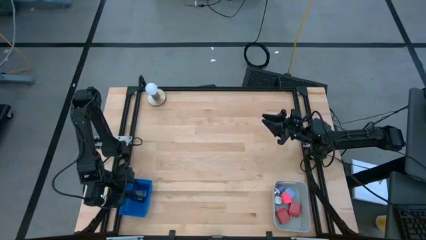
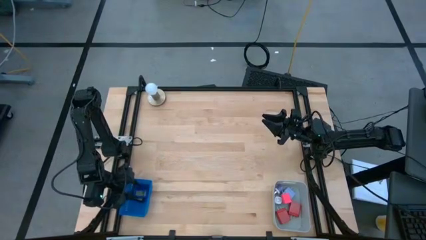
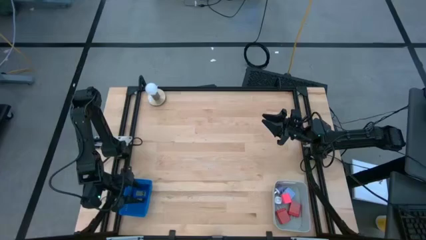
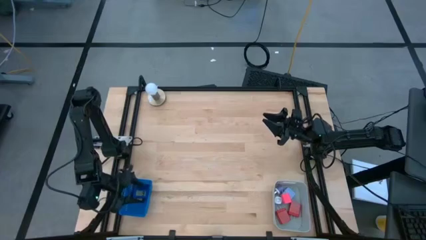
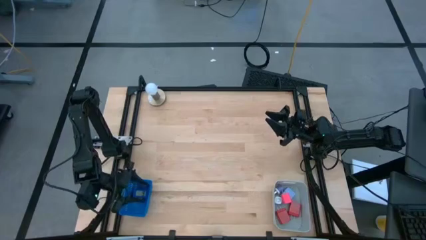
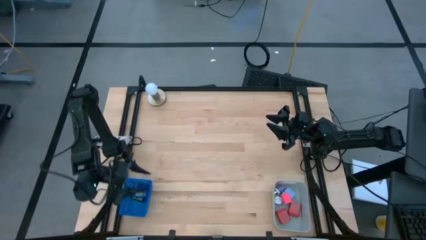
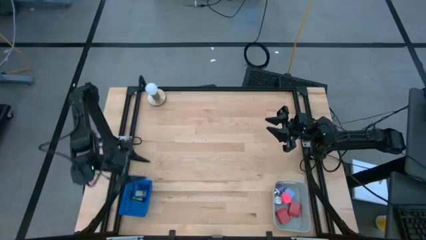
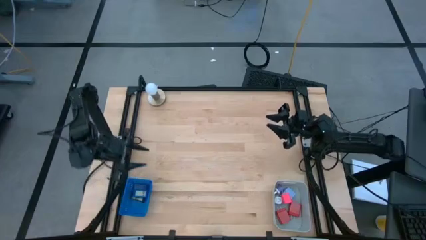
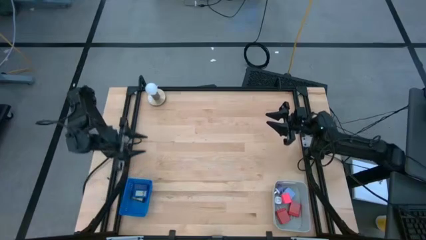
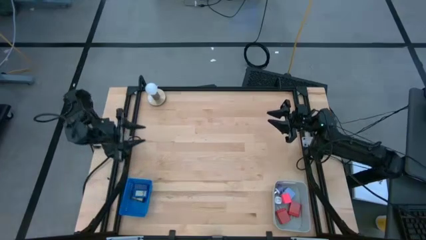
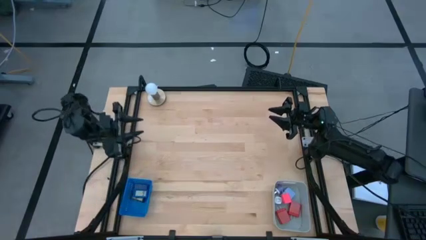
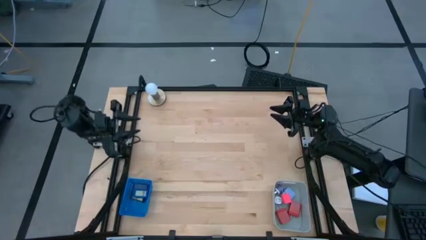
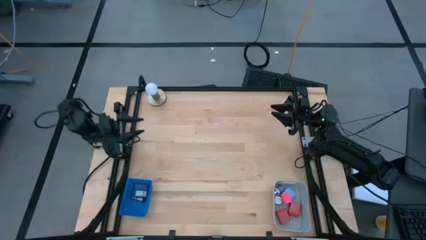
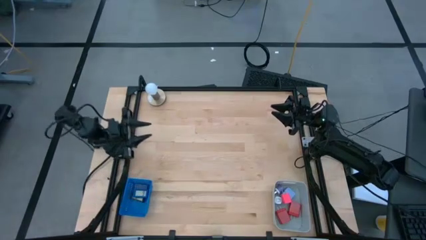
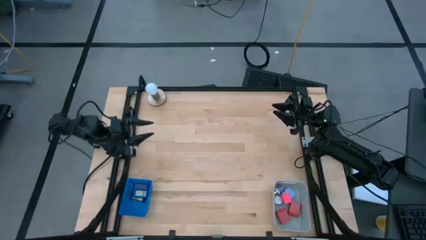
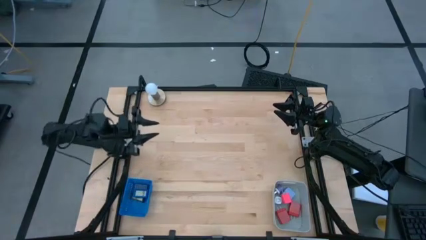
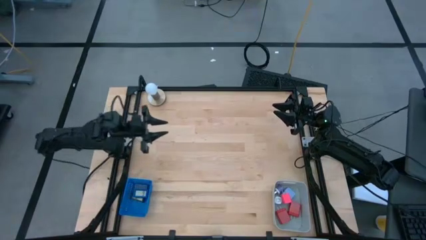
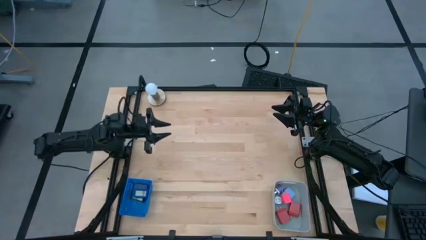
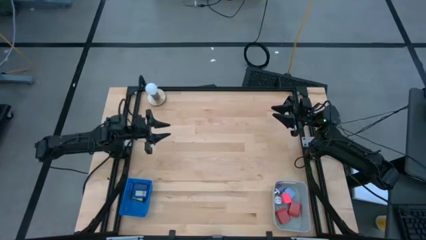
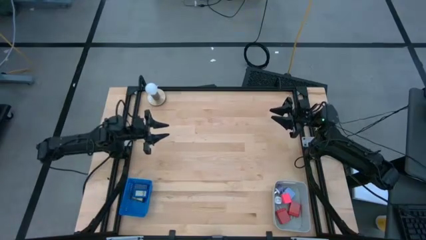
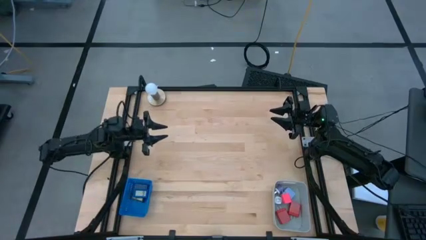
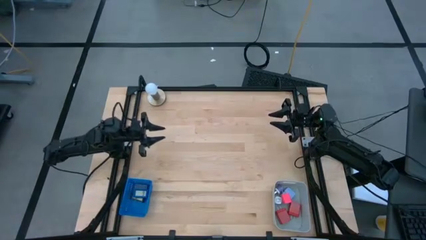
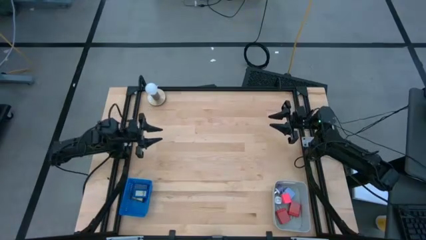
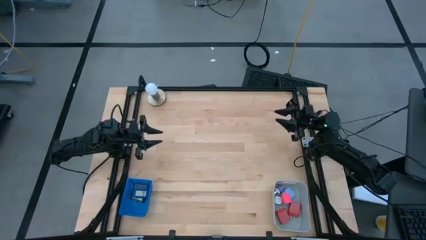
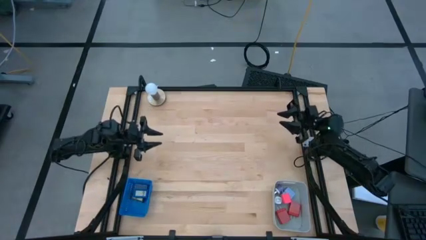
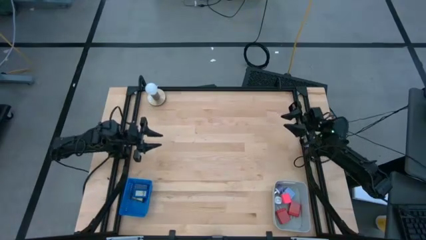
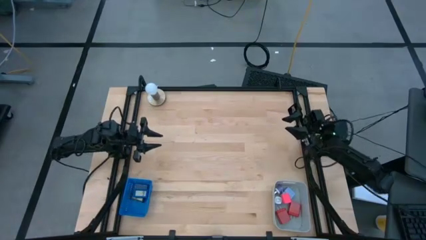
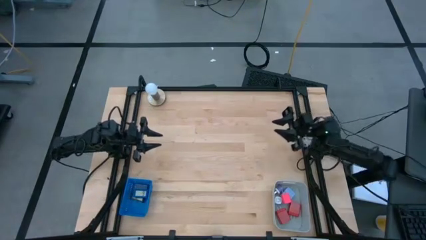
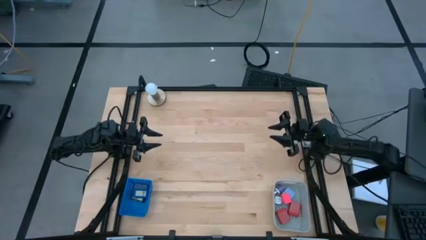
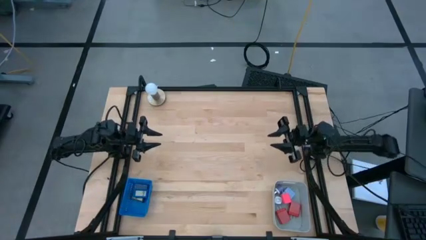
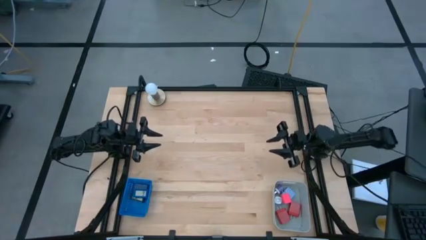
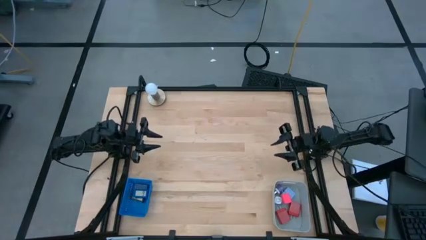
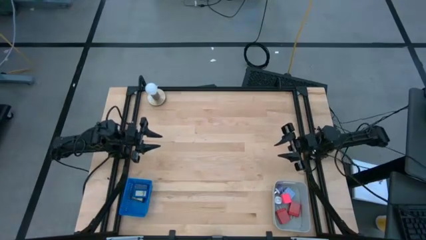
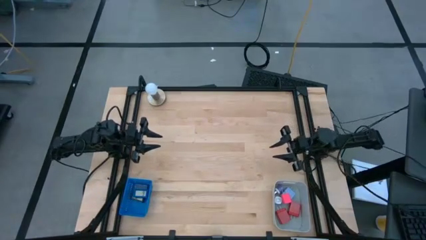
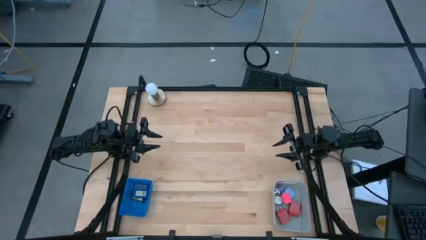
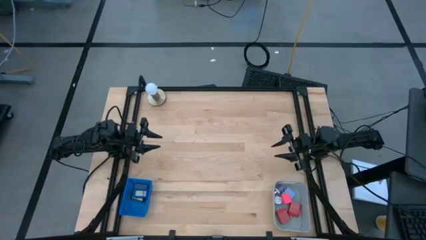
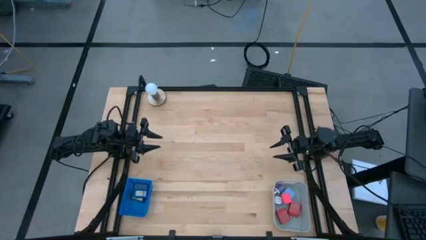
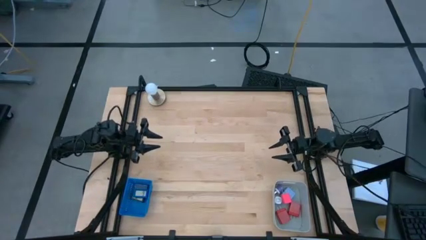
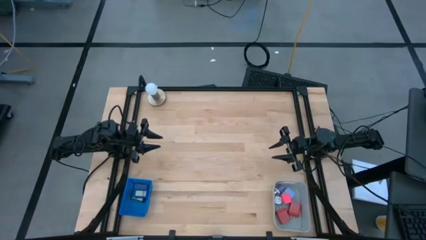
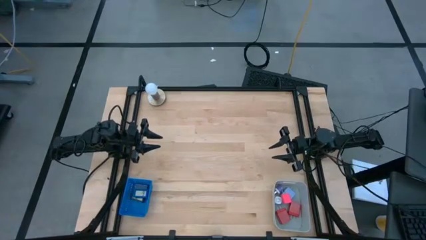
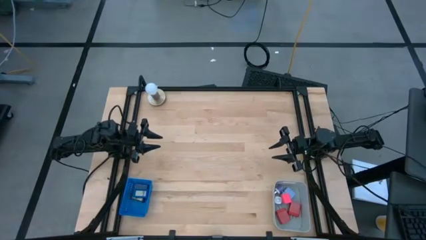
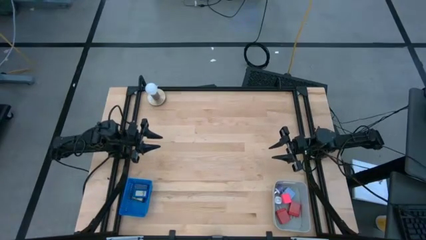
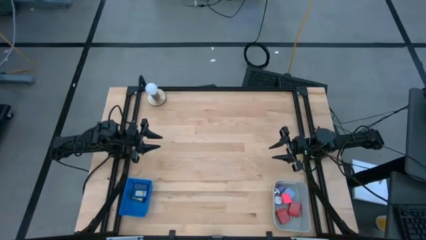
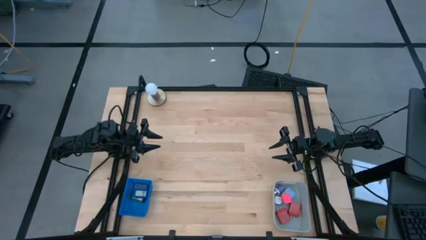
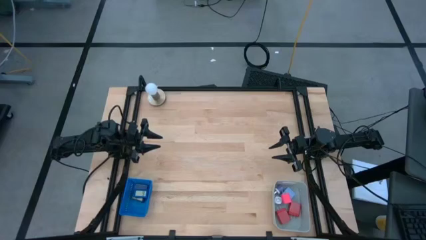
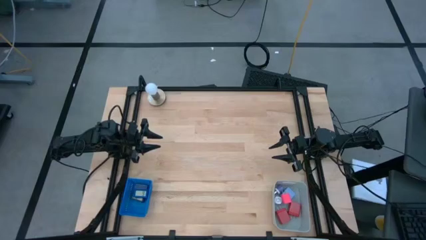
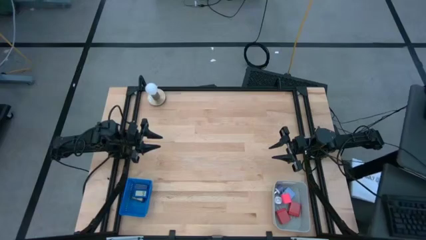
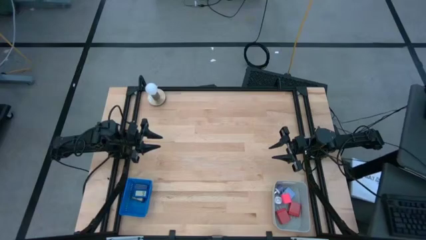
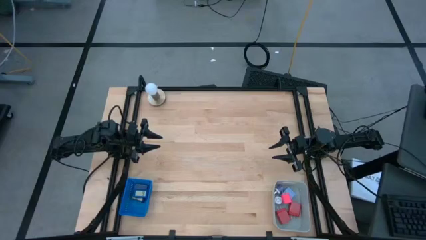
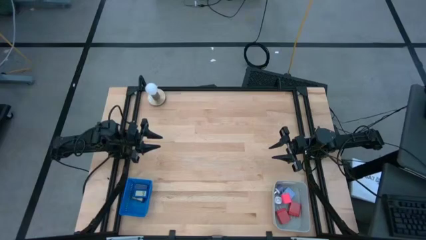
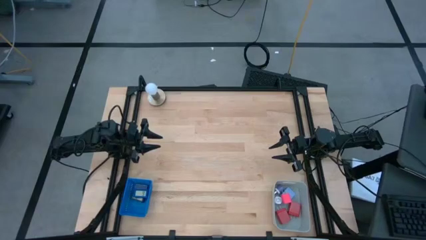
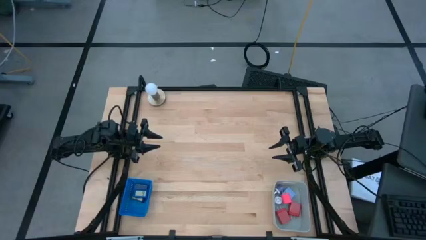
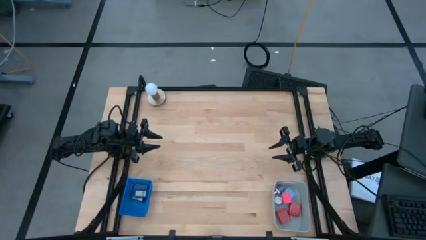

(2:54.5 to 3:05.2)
Task: Pick & Place Office items
Return to Home Position

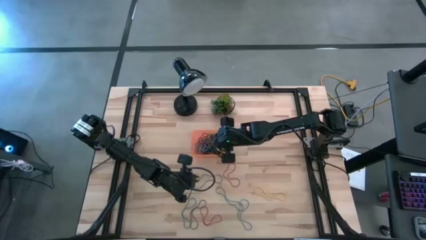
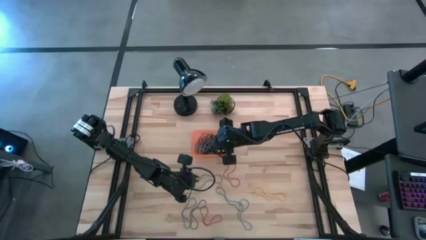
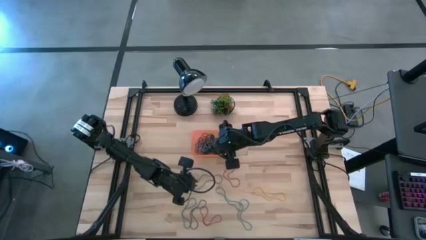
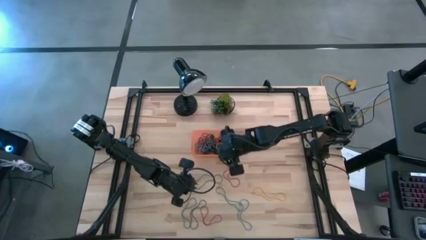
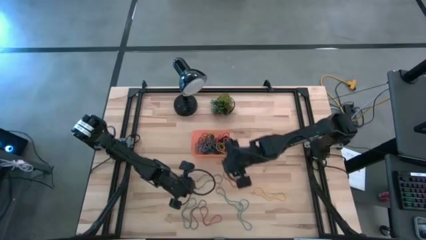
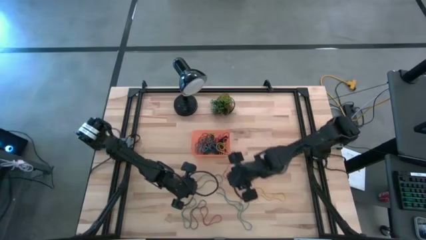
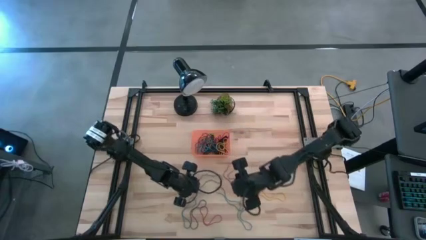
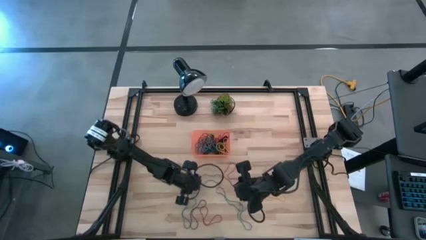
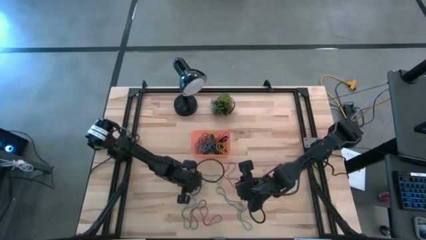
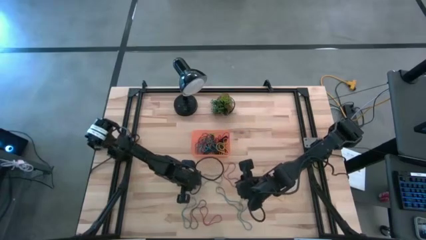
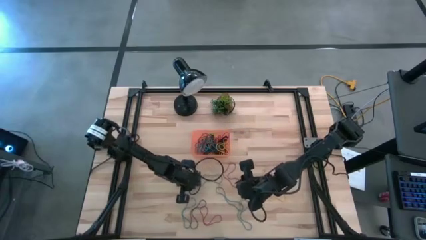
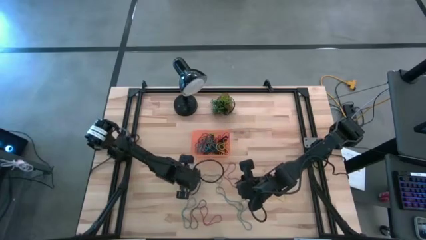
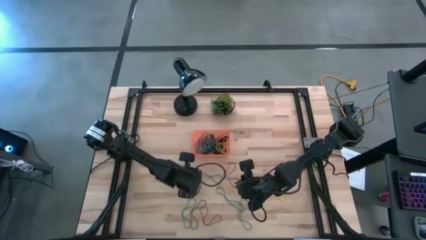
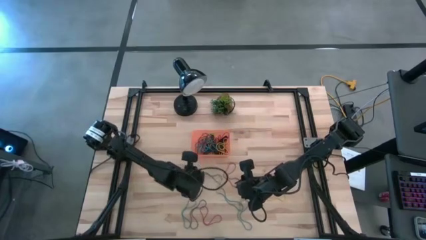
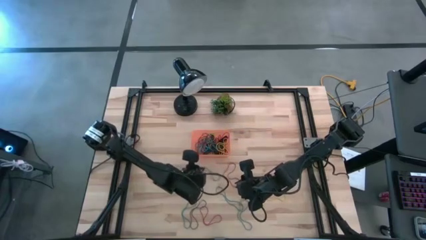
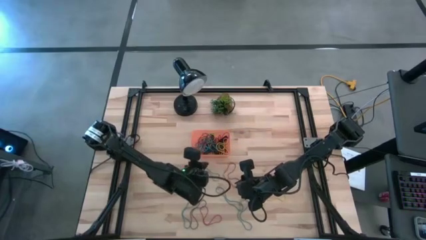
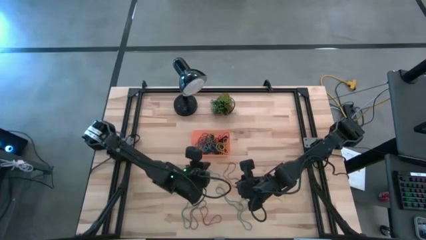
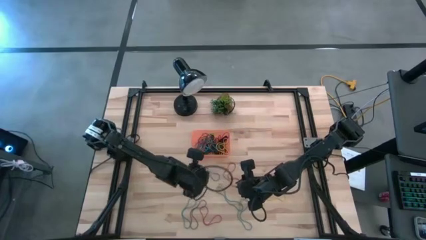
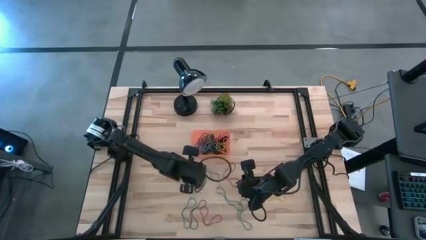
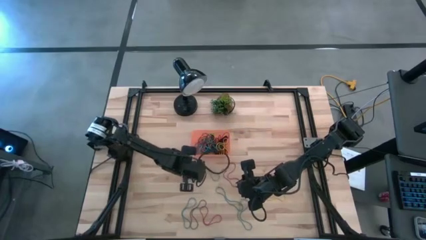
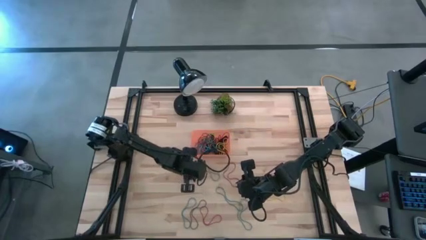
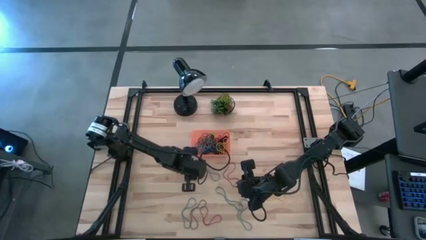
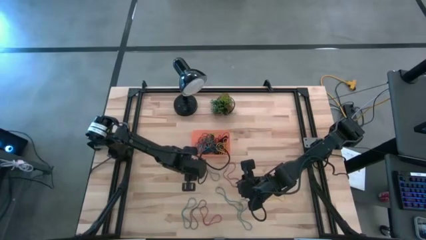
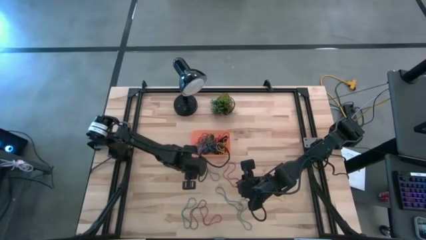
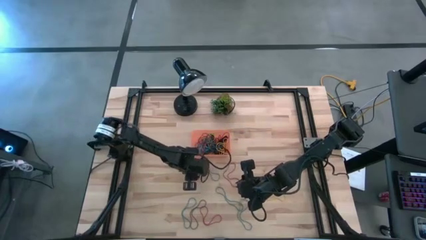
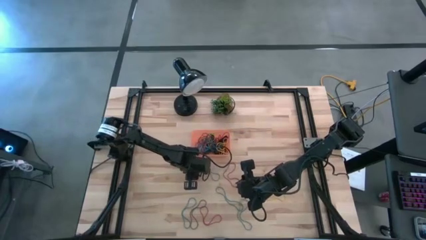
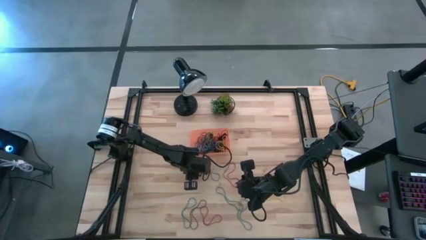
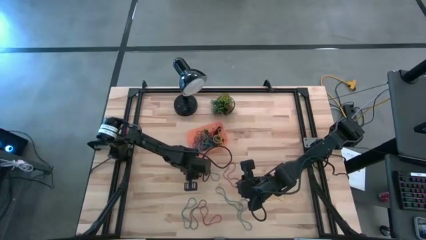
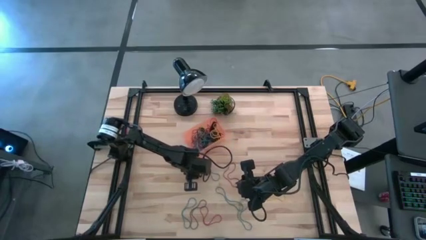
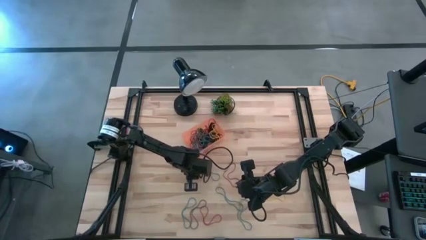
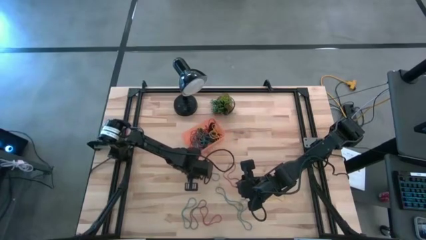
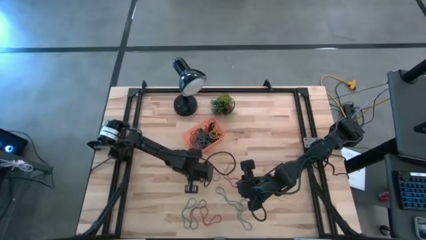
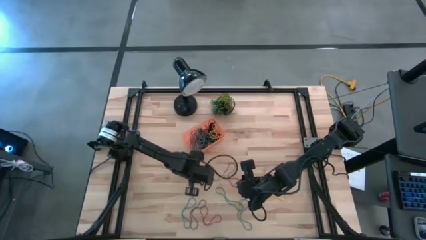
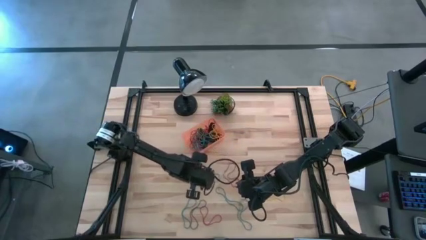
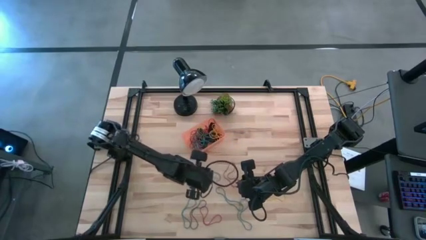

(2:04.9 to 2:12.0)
Task: Pick and place rubber bands into bin
Put the blue rubberband into the orange bin
